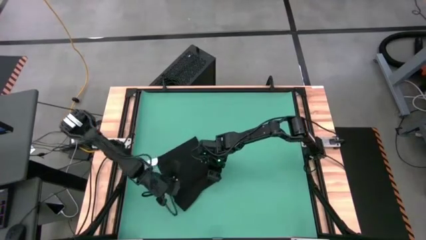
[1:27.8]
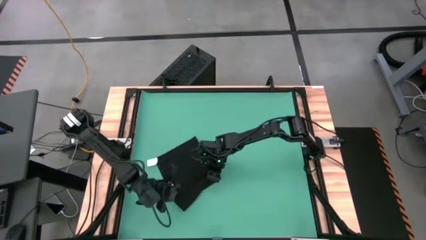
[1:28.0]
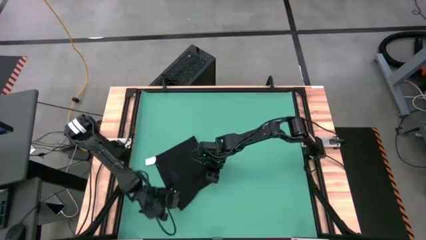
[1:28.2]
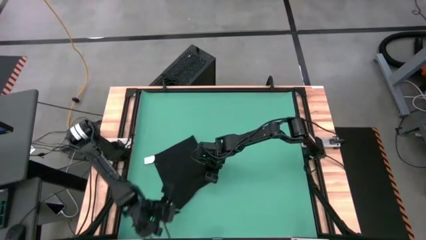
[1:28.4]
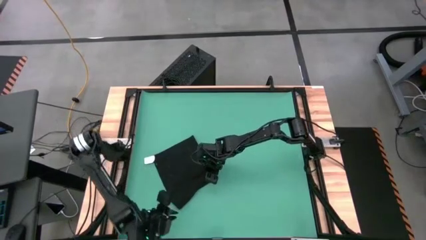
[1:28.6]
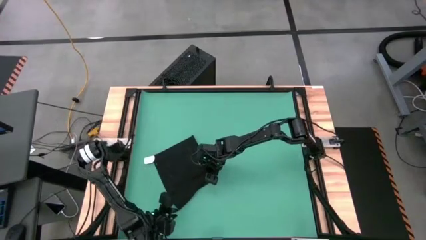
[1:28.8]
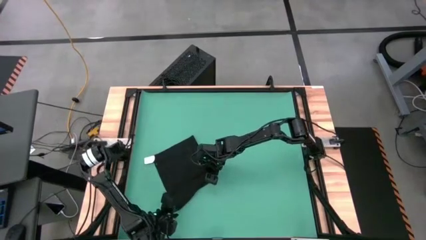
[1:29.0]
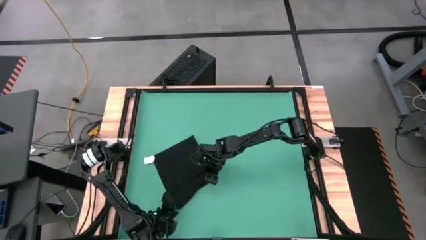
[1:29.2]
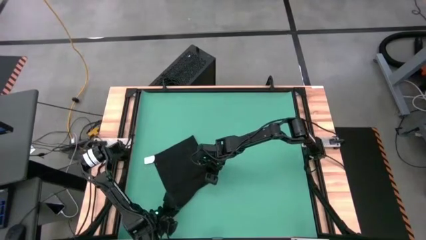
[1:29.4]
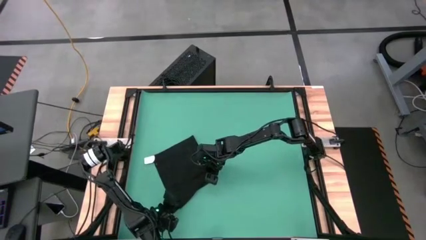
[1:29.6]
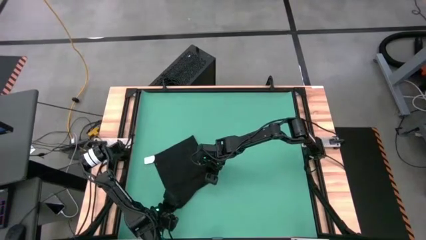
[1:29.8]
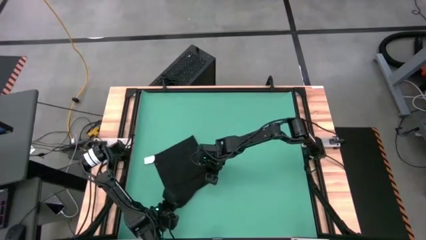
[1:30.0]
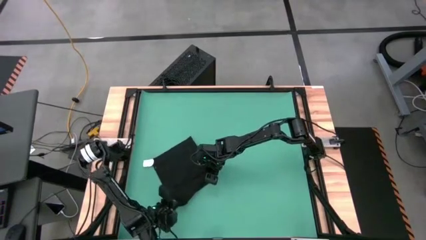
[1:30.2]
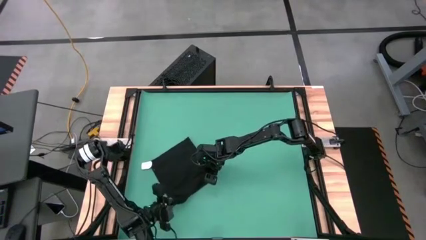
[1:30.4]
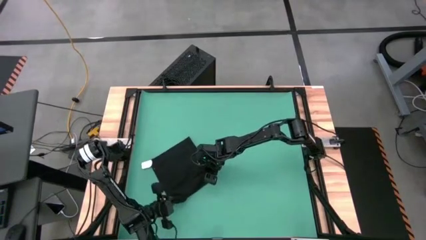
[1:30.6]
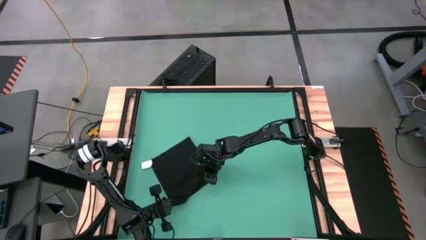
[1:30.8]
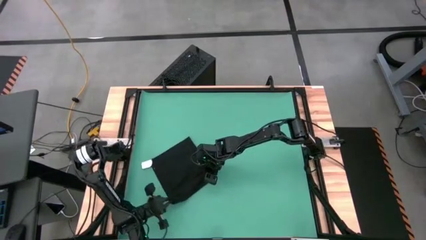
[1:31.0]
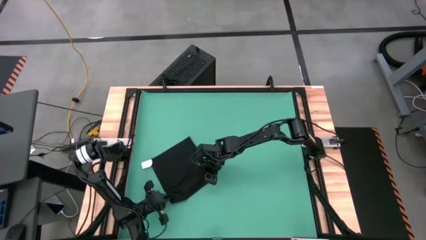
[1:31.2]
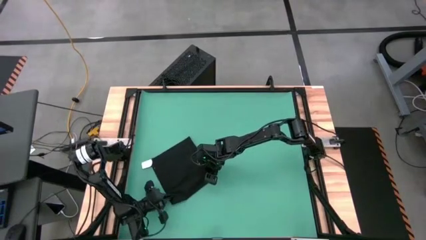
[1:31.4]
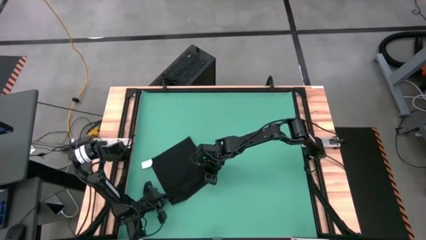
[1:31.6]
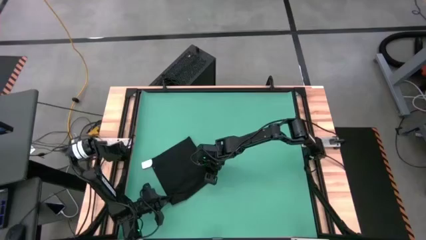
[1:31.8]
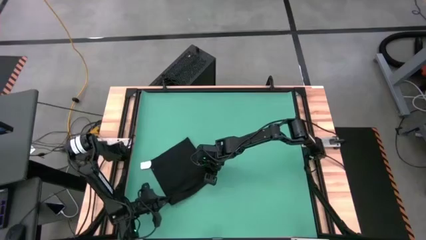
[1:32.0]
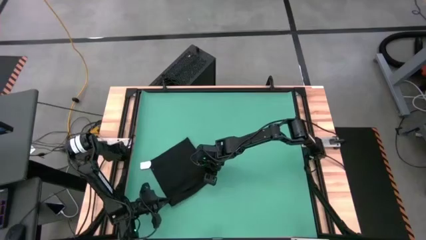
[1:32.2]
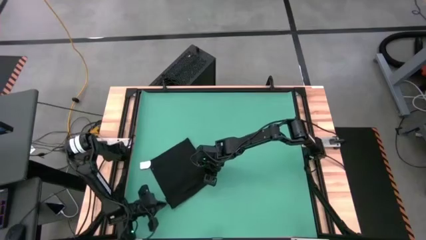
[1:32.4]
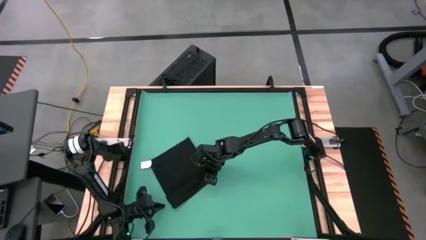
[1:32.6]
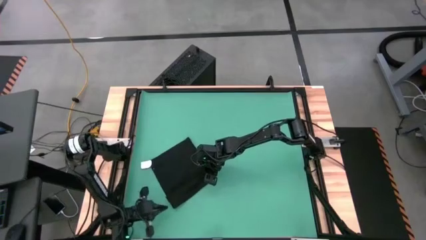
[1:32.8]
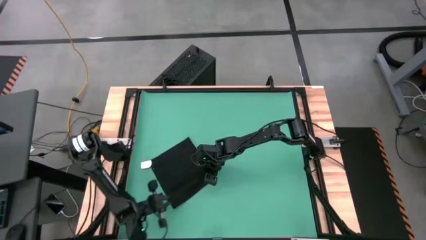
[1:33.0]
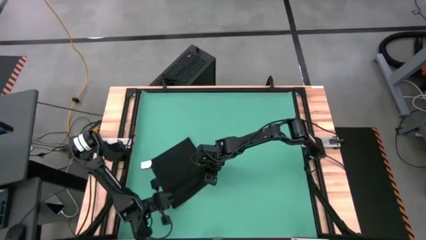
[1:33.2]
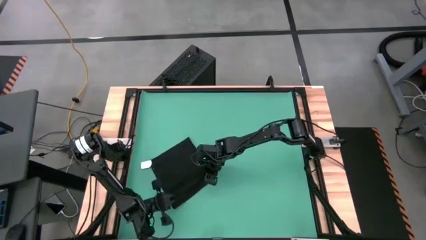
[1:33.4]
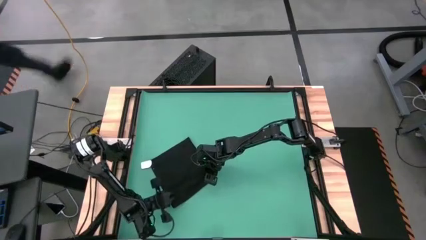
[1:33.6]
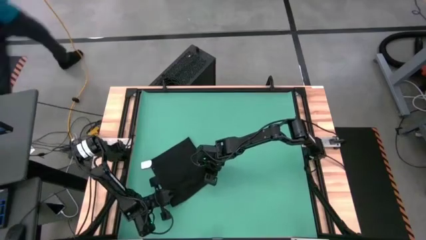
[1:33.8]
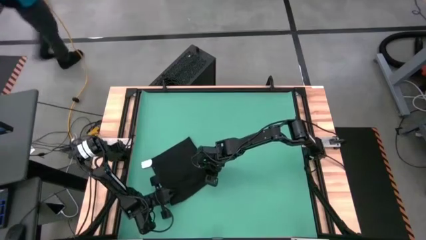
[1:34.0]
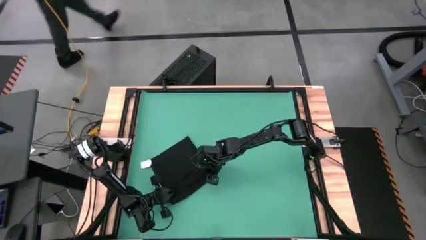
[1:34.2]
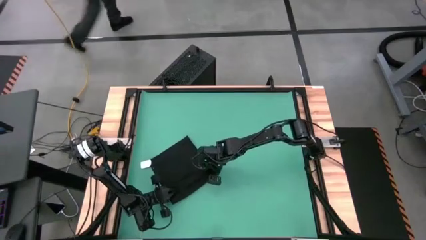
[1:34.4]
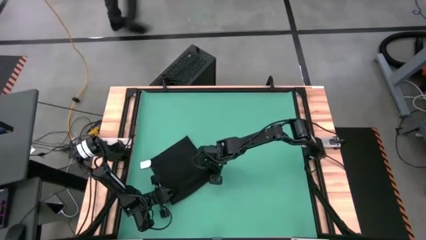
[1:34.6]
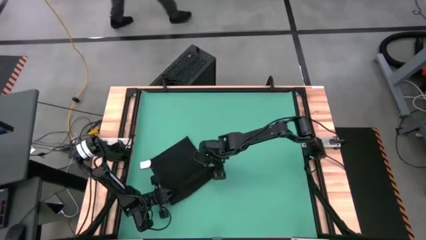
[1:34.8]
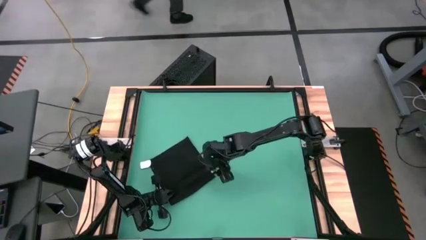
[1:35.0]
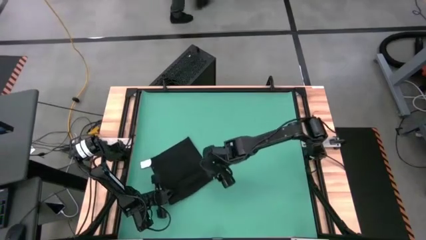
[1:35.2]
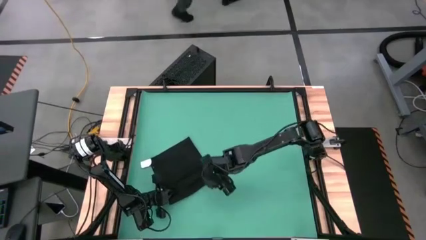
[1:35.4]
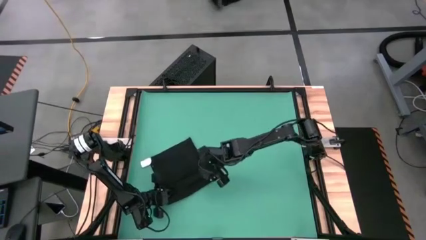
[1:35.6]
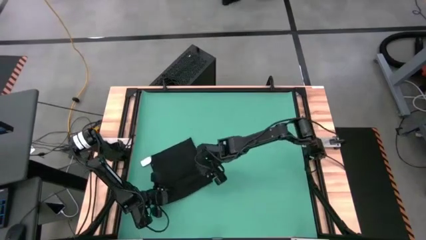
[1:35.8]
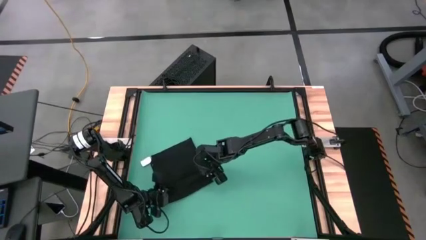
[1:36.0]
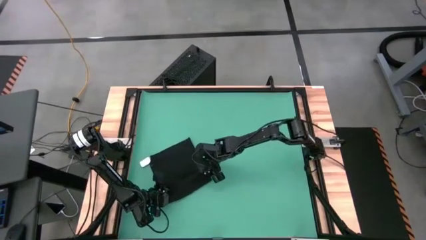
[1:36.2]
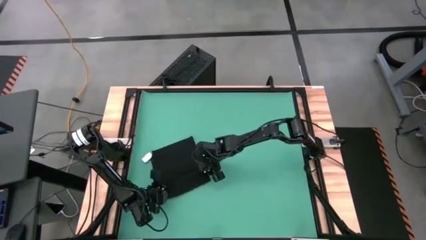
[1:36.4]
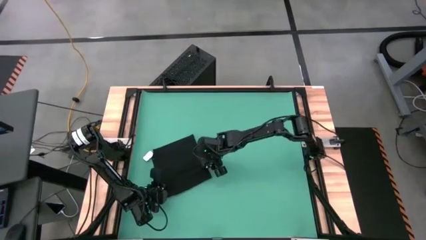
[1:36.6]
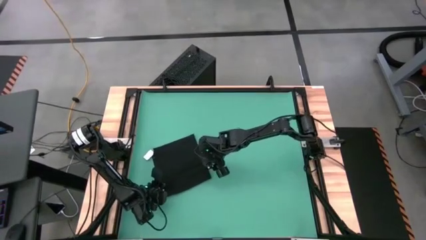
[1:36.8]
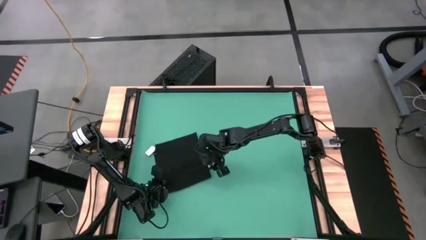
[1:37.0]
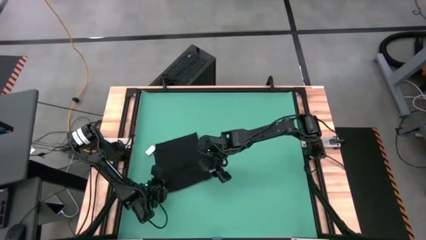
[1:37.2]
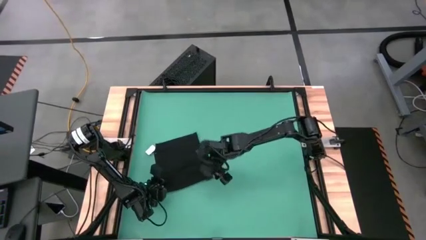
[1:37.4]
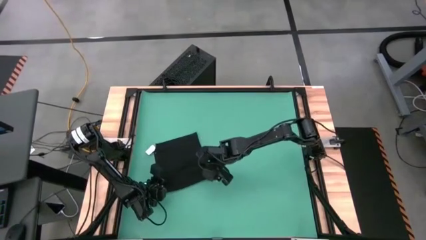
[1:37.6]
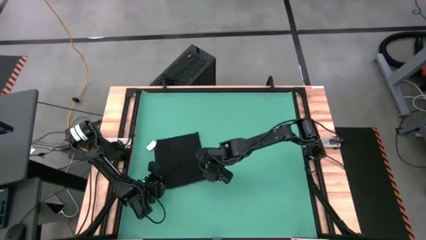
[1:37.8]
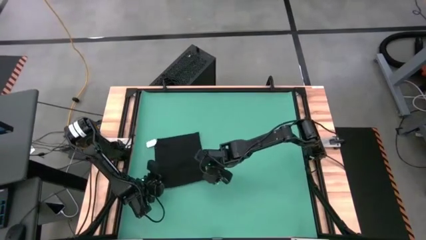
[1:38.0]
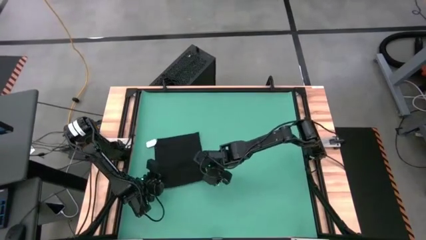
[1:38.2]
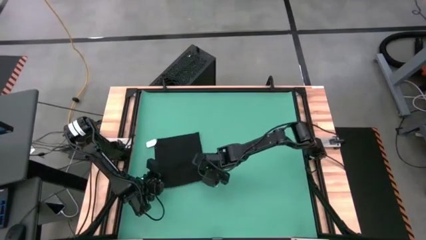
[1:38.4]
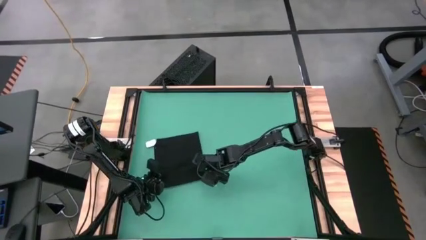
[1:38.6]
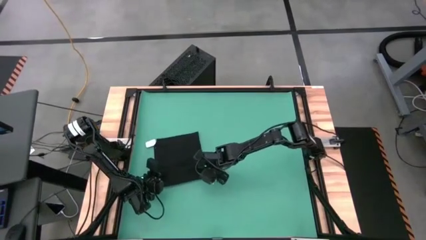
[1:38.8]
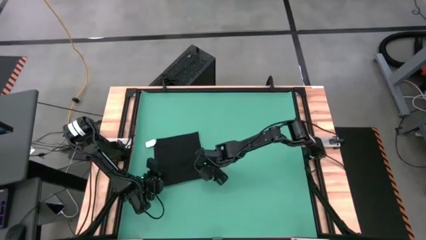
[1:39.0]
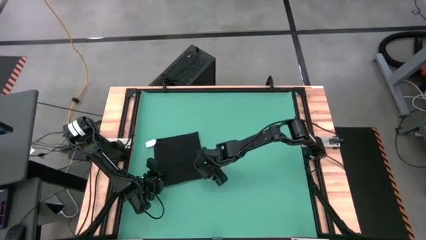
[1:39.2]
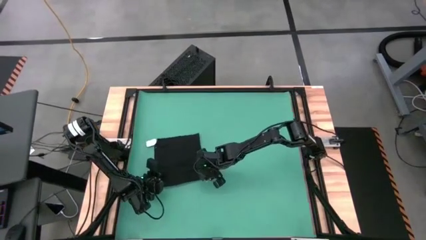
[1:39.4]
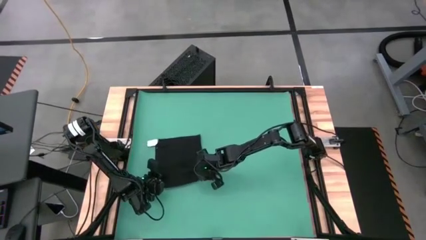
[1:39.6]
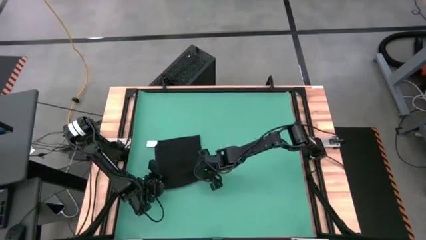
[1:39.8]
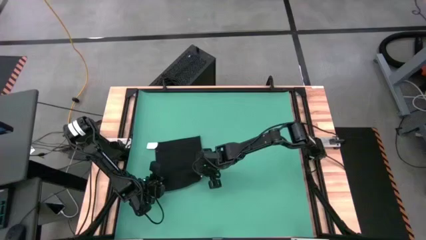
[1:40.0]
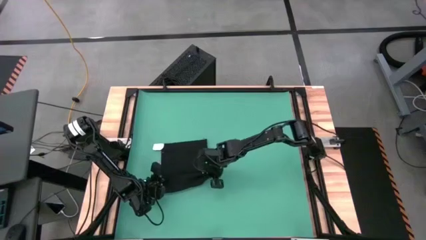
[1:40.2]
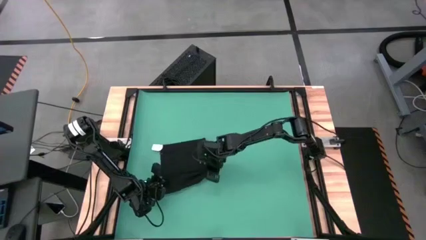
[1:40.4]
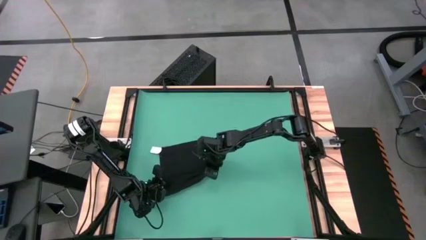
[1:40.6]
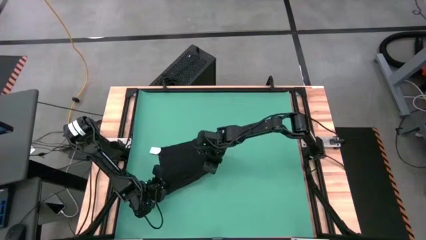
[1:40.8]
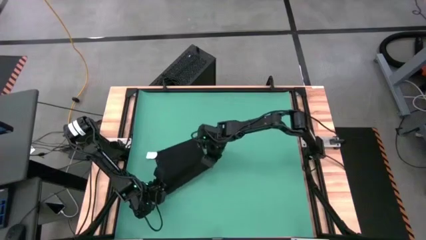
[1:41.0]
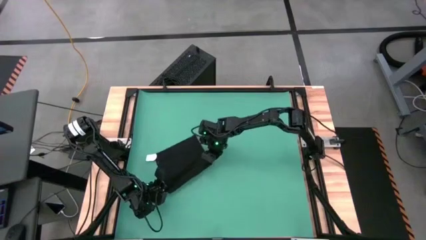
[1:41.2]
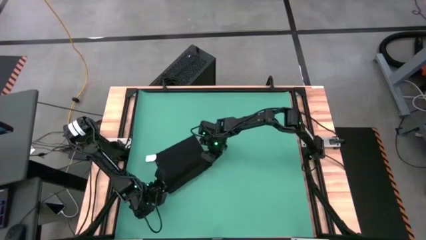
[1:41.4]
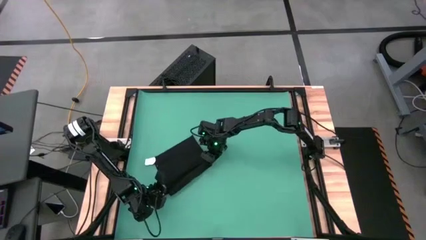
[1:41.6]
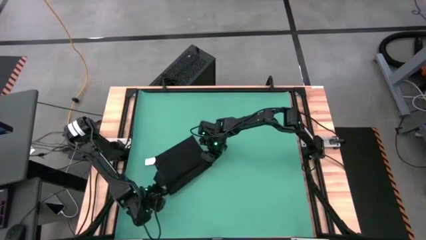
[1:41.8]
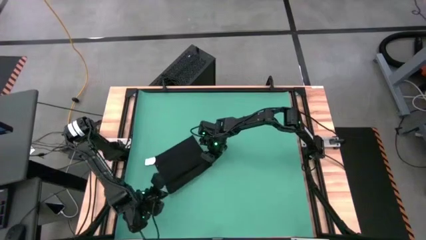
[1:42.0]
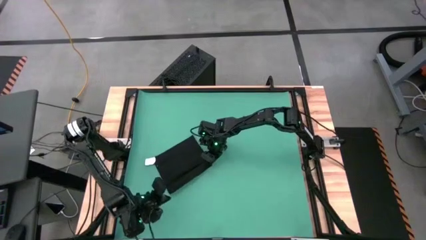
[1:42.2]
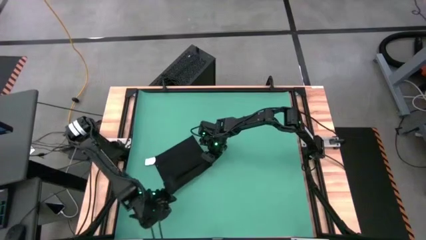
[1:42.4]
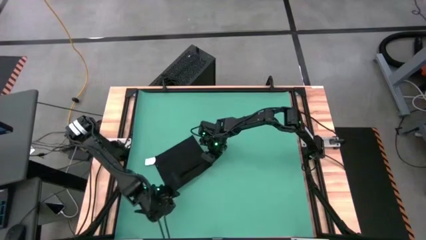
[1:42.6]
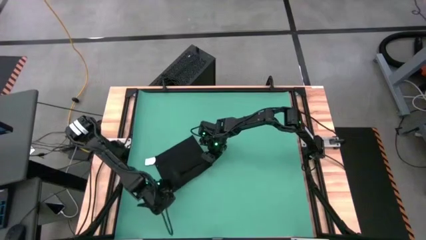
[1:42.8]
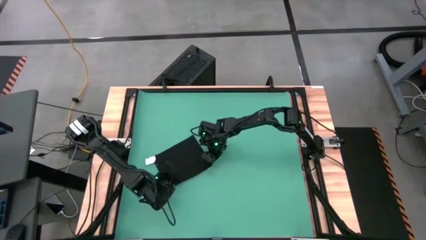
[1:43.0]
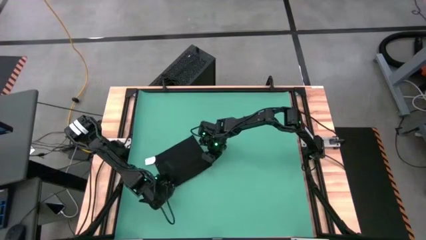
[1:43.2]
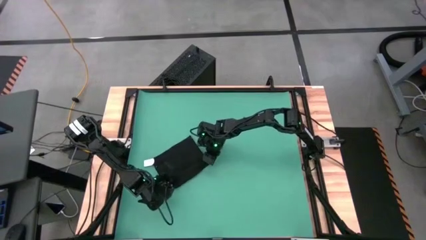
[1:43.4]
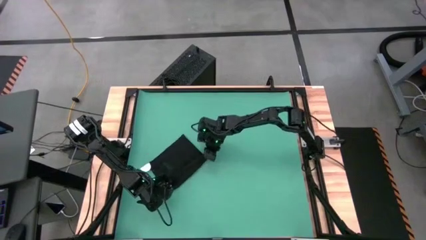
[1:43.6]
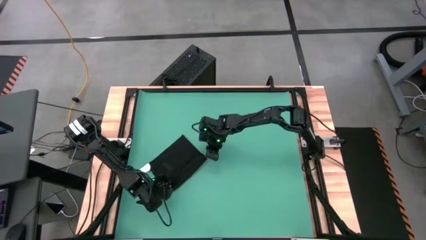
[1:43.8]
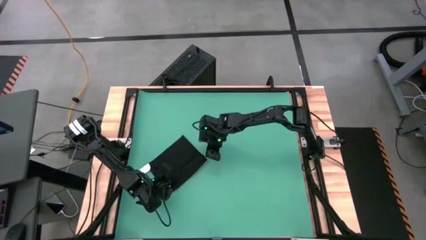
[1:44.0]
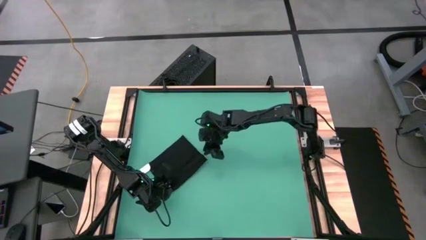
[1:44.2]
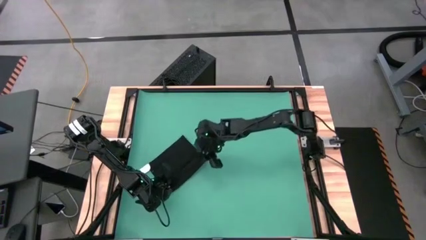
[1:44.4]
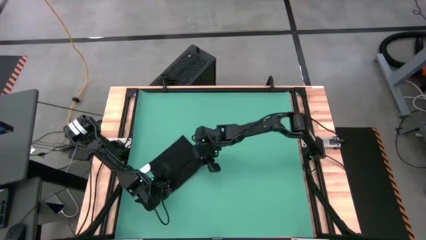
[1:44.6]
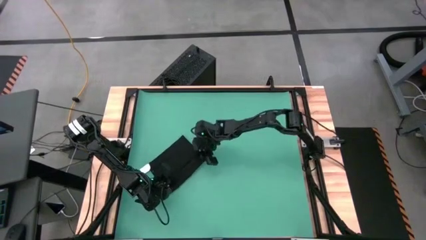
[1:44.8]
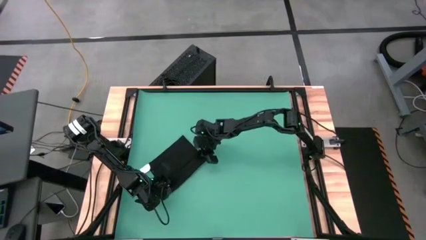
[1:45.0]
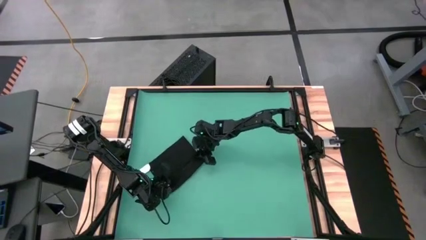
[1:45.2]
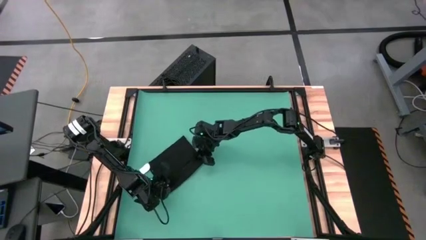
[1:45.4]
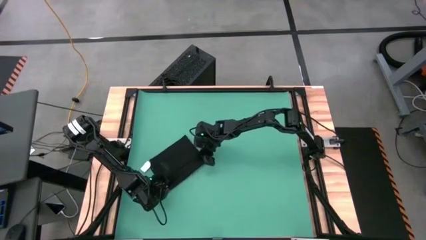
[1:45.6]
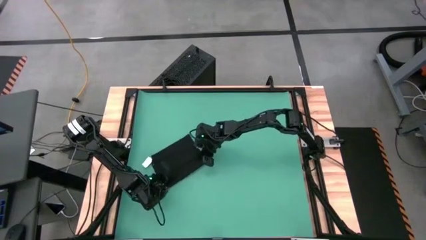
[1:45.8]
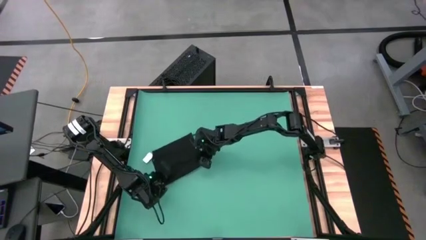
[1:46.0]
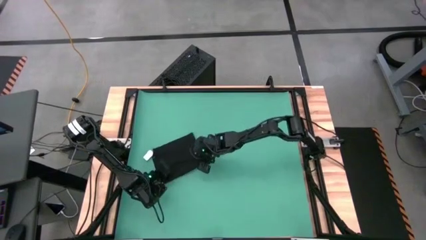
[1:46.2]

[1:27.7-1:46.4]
Task: Roll towel into tight, uniform cylinder
Roll the towel
